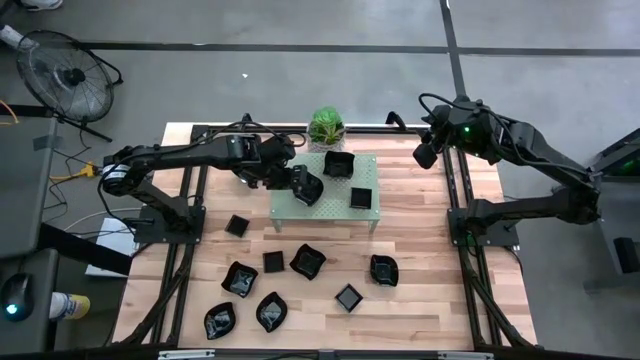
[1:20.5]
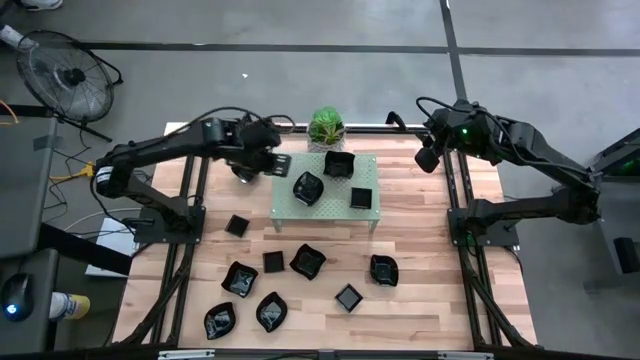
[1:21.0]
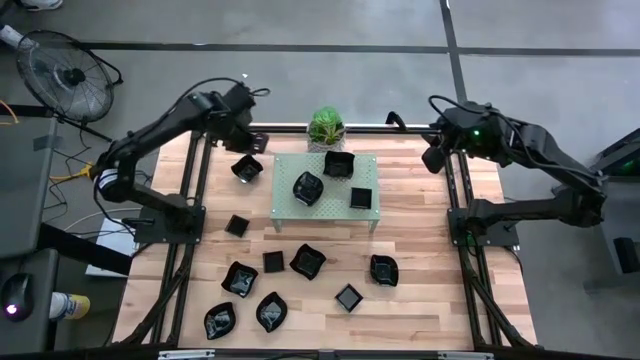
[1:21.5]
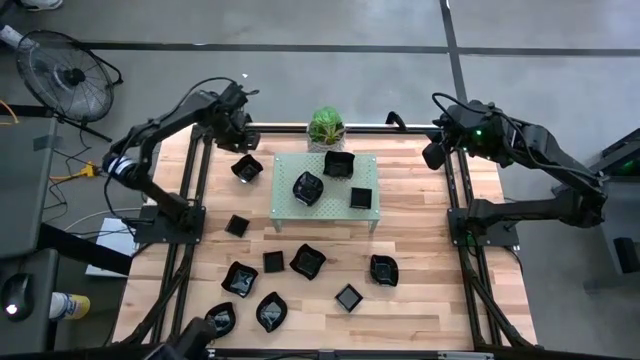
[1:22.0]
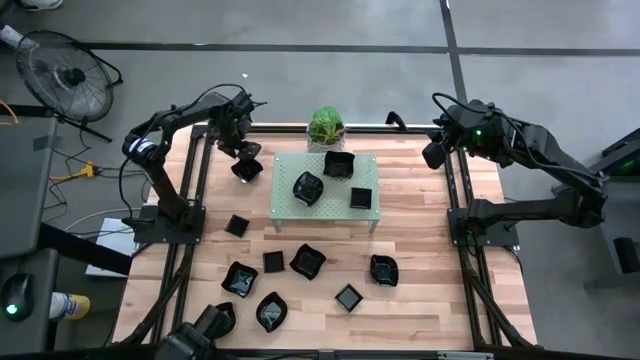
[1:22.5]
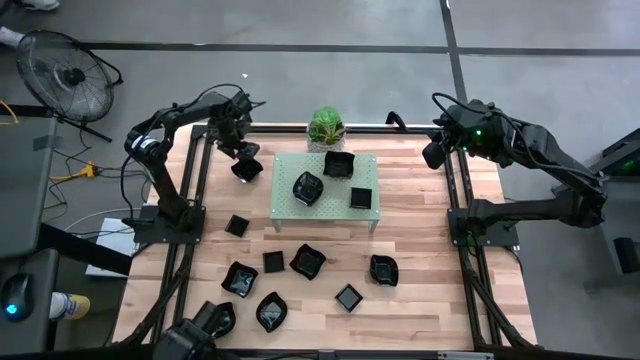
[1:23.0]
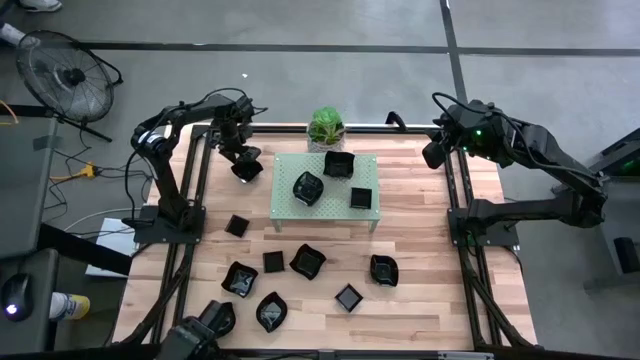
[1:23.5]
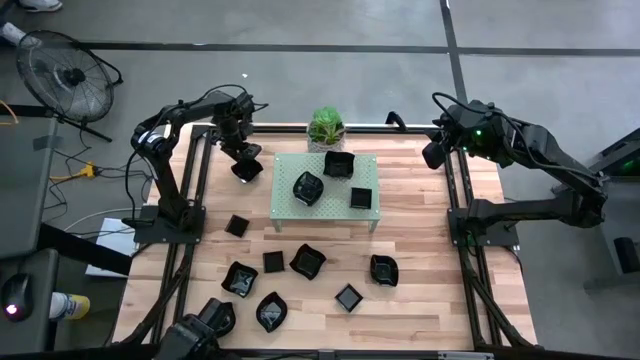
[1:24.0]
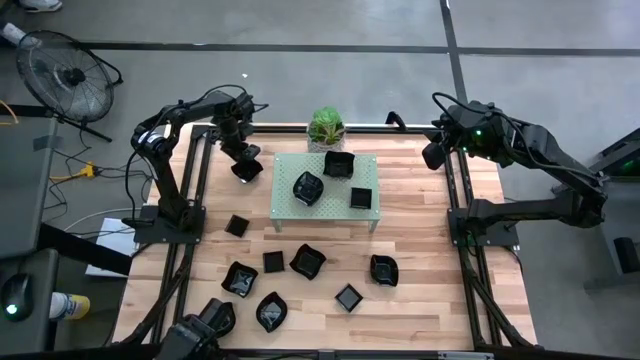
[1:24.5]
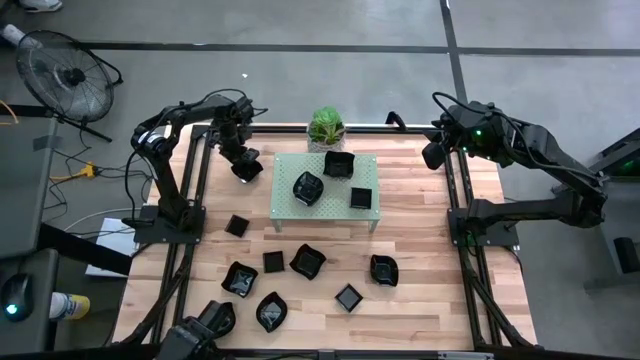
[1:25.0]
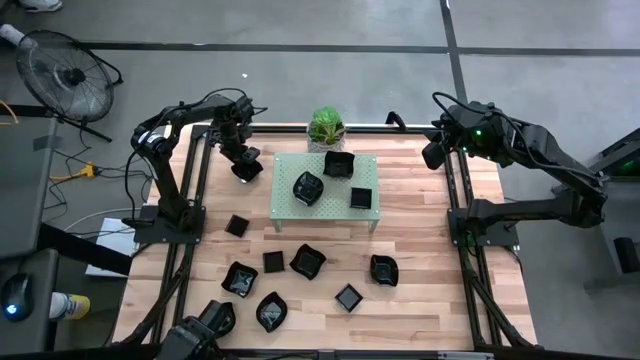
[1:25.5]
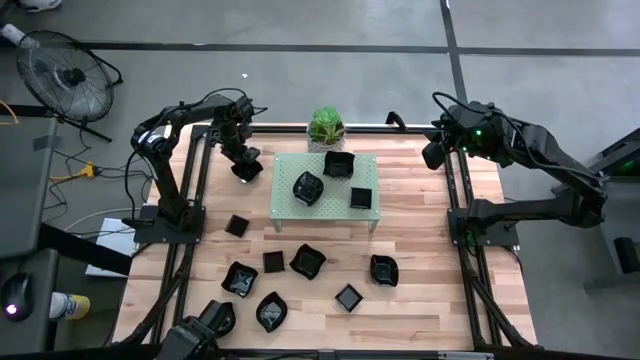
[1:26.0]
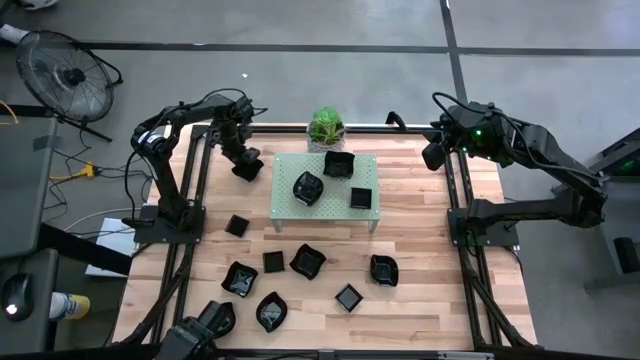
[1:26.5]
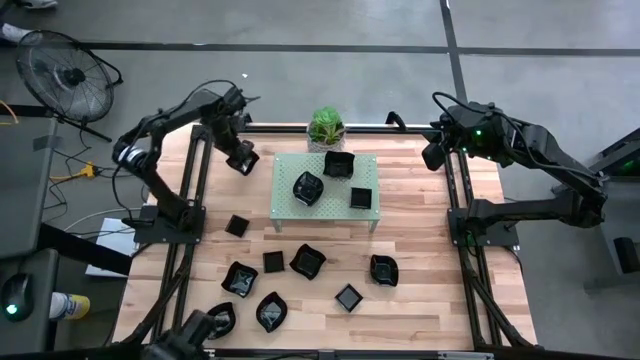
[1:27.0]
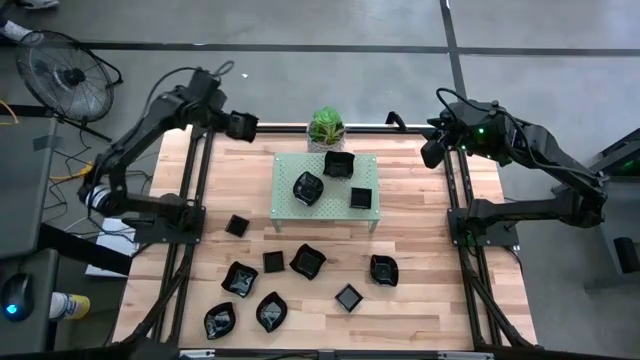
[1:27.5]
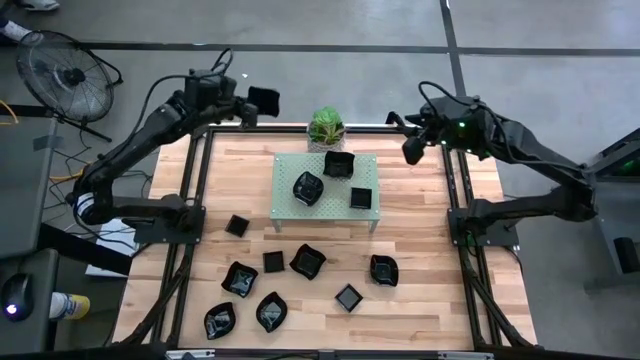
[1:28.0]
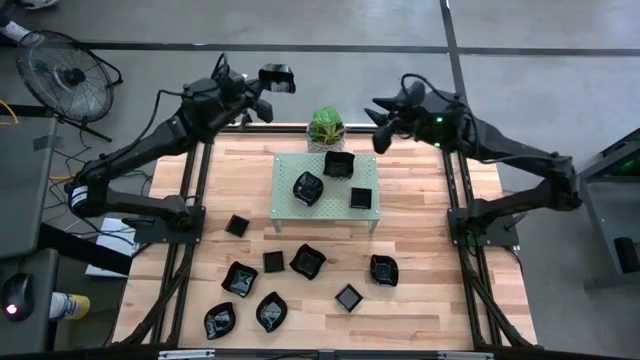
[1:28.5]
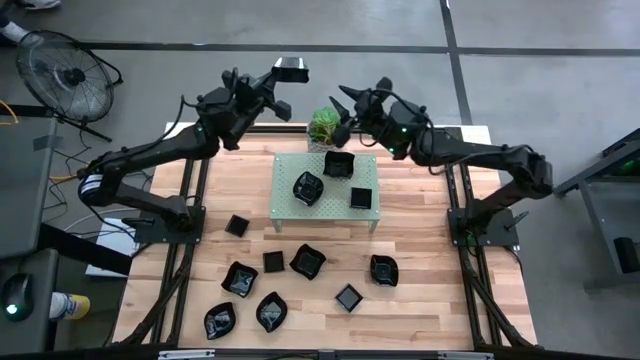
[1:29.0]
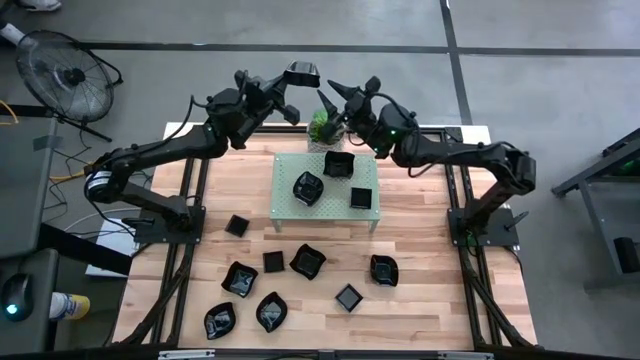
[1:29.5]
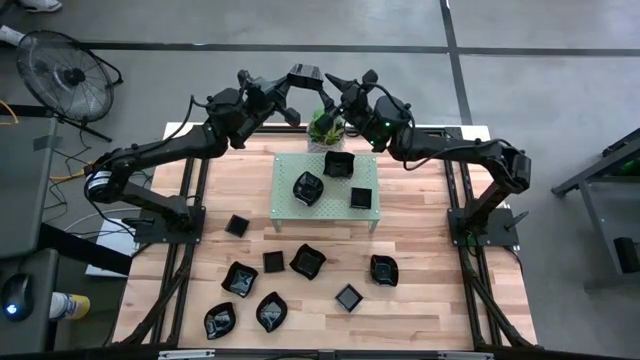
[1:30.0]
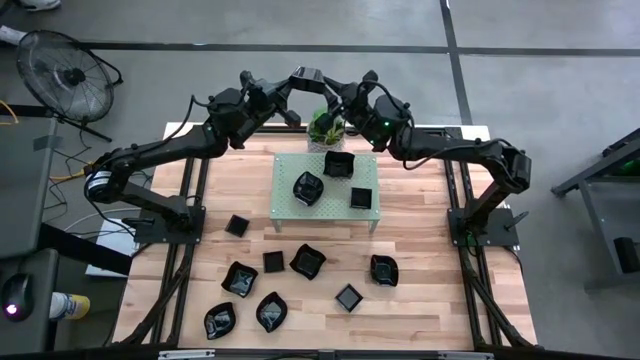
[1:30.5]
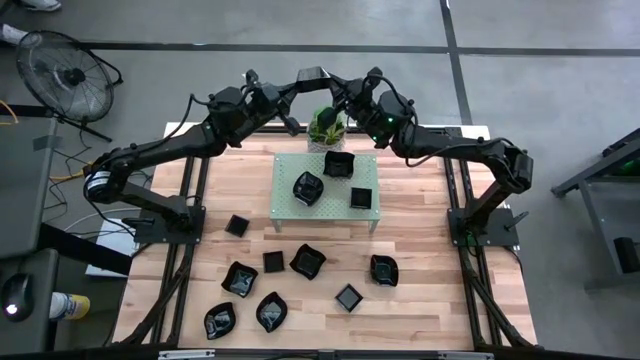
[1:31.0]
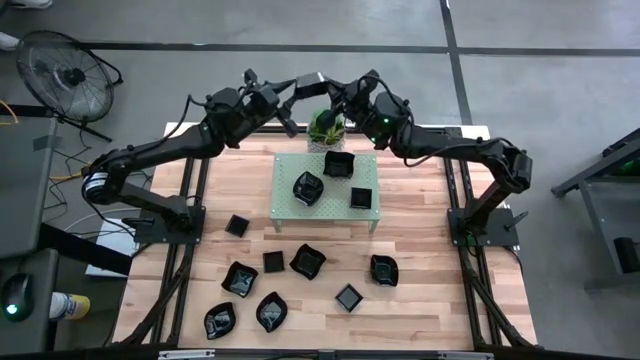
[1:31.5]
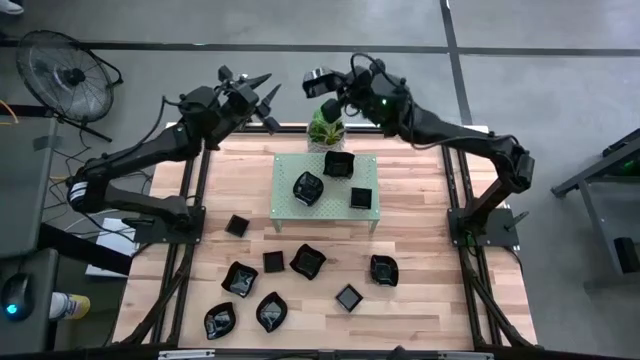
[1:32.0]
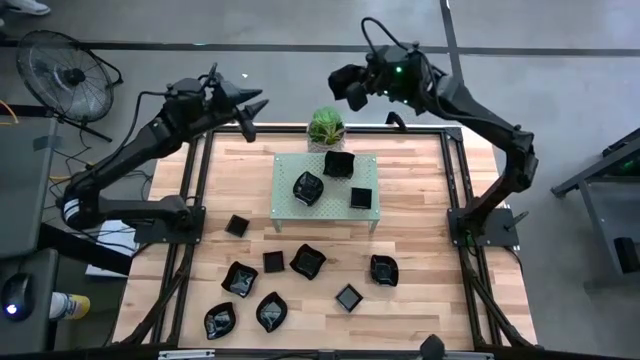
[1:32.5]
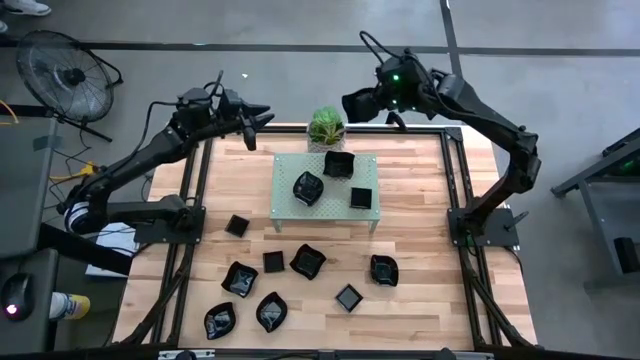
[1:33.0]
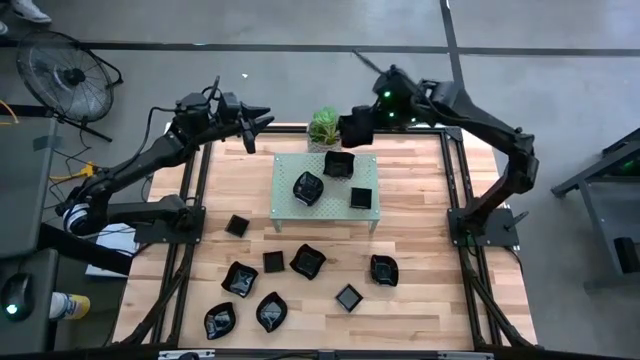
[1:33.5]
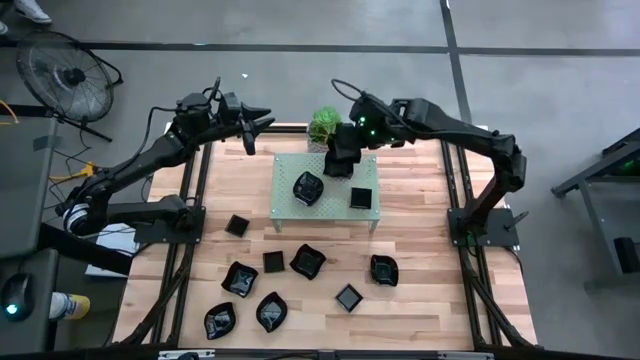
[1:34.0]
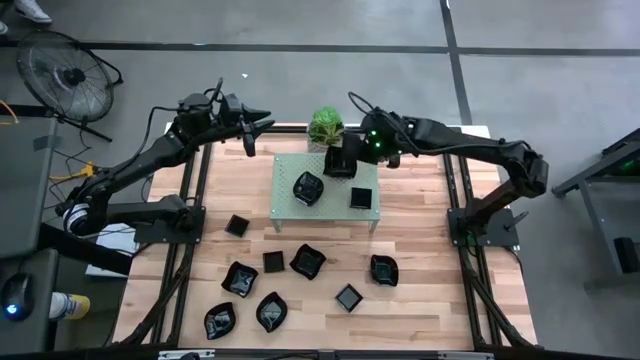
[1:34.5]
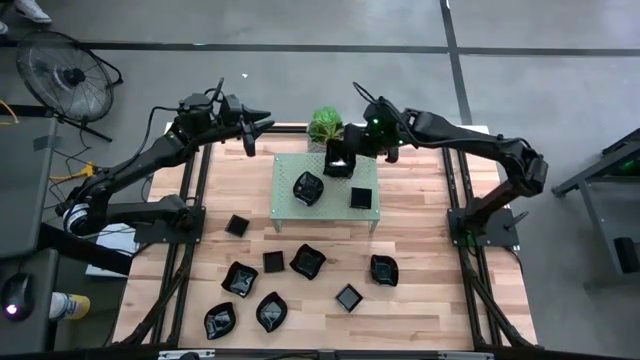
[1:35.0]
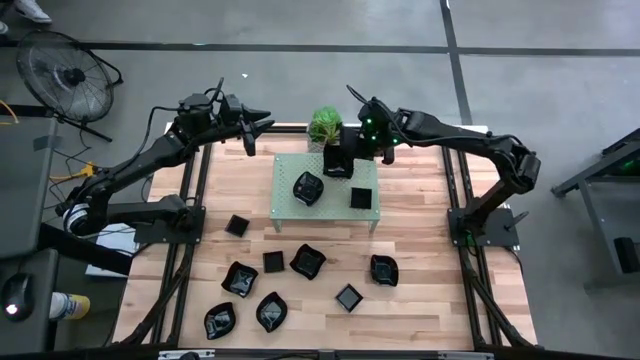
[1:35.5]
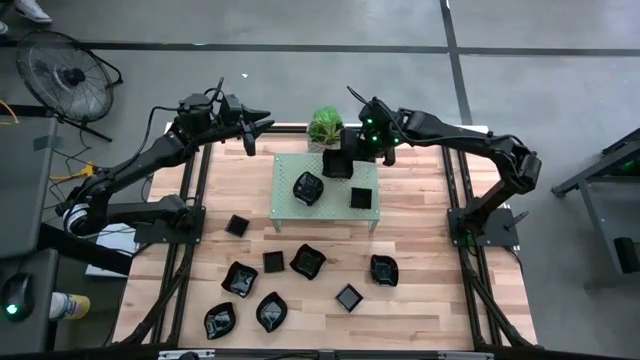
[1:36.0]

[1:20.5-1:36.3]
Task: Pick & Place Mini shaped plates
Stack the black distorted square plate on the other black distorted square plate on the shelf

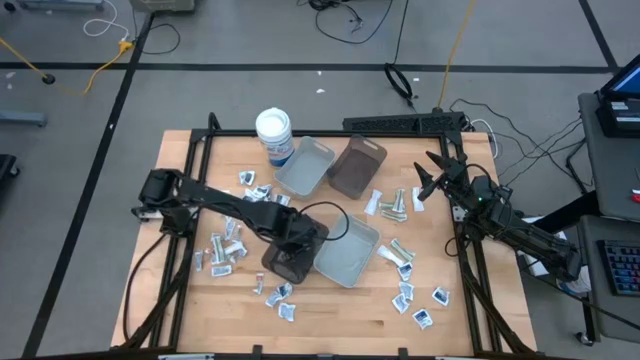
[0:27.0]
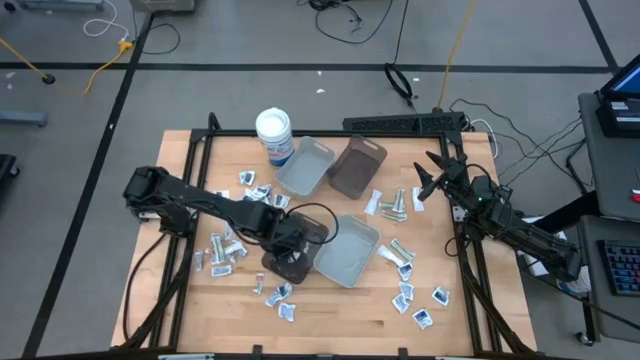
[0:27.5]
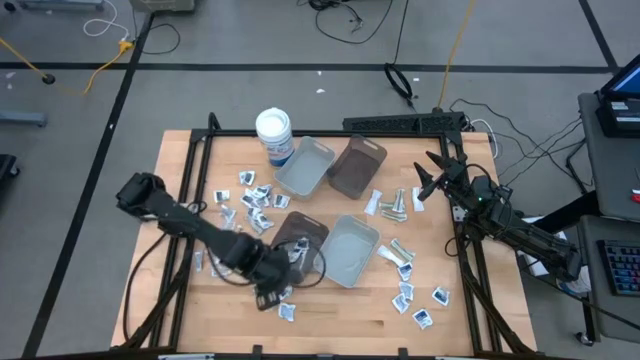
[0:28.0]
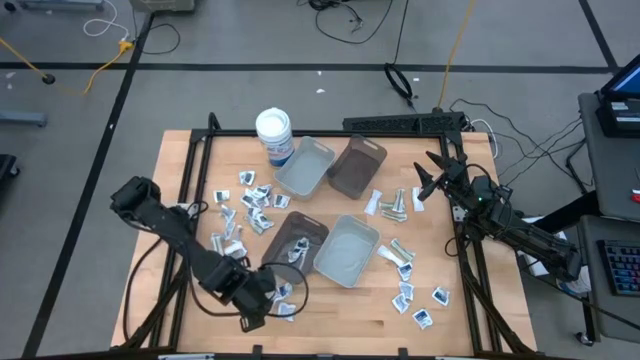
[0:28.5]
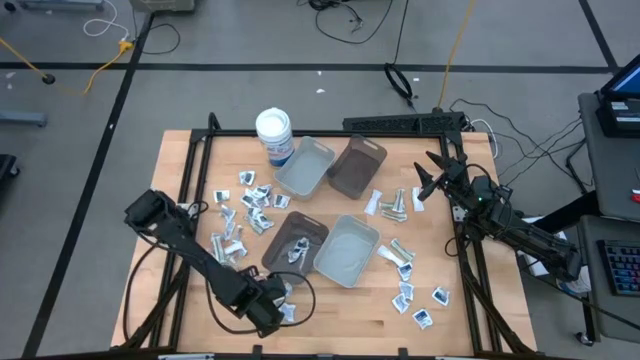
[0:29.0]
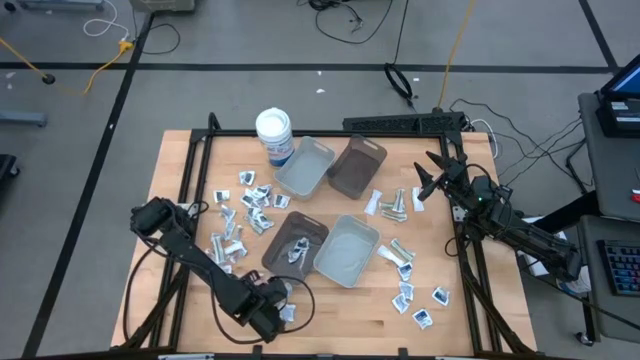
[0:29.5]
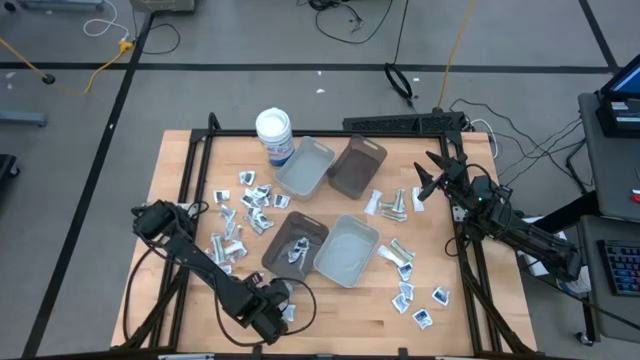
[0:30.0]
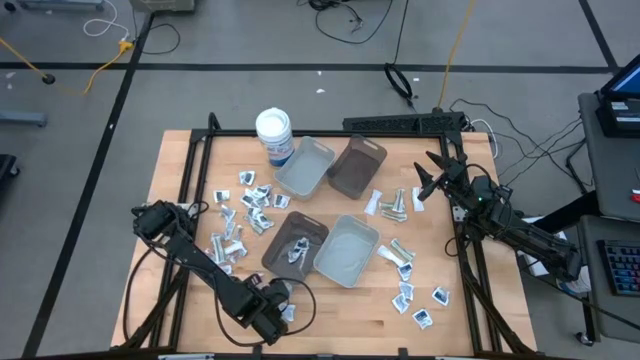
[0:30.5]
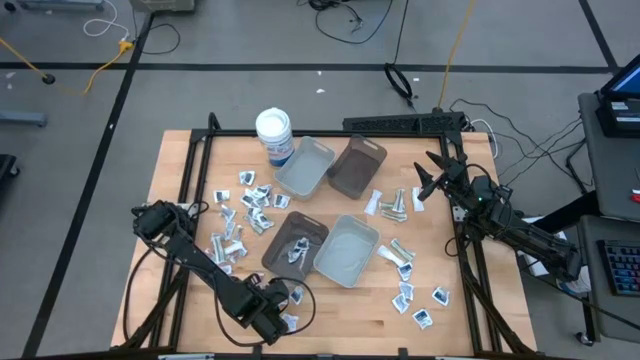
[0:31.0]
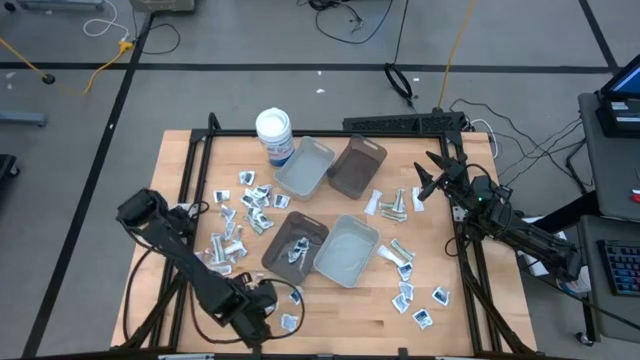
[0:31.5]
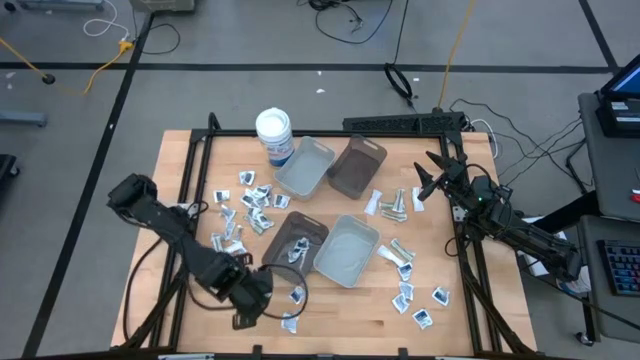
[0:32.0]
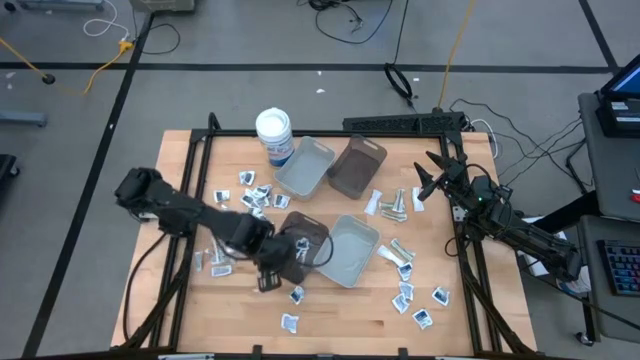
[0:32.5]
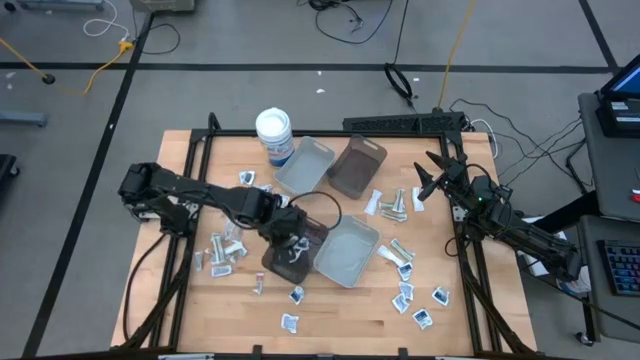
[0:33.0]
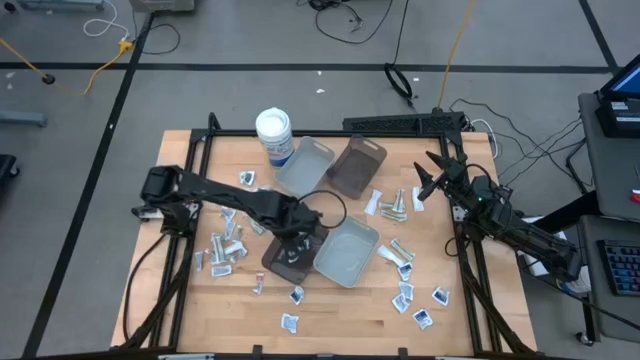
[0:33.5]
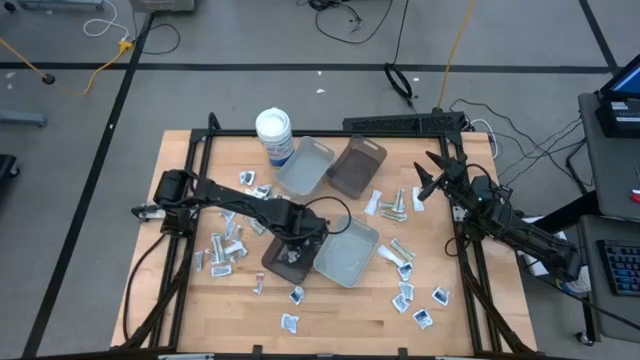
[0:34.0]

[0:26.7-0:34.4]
Task: Pick & Place First Aid Supplies
Put the blue alcohol pad into the bottom black bin
